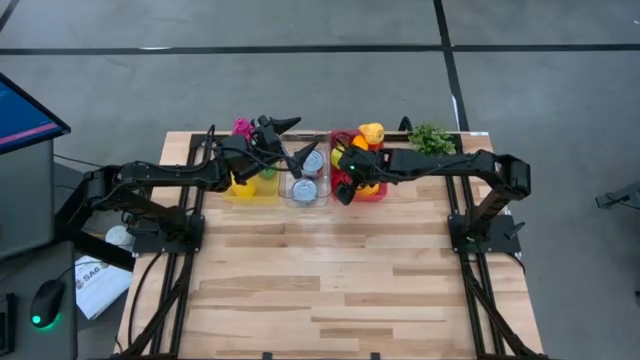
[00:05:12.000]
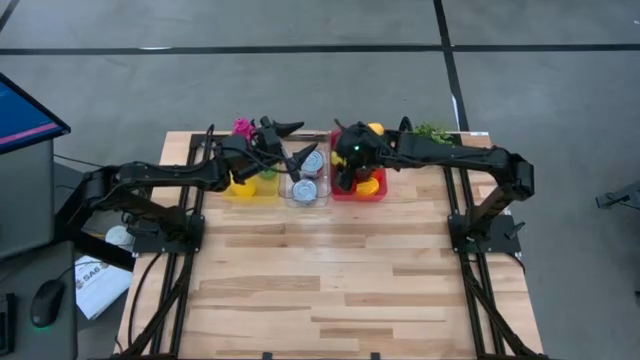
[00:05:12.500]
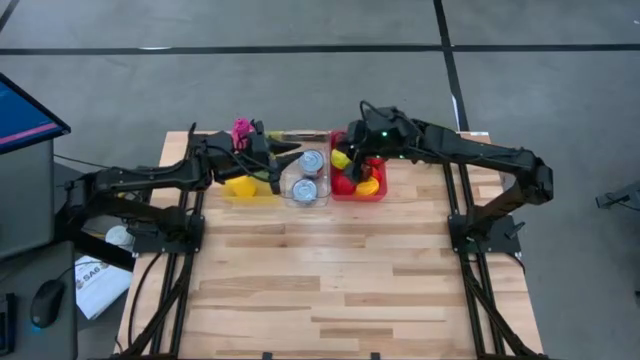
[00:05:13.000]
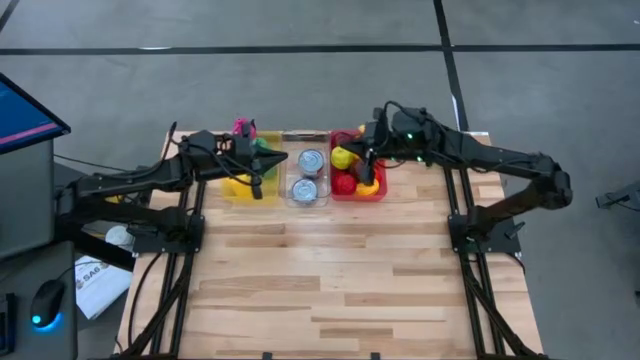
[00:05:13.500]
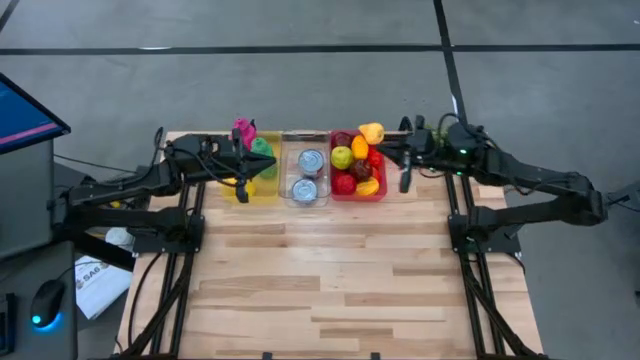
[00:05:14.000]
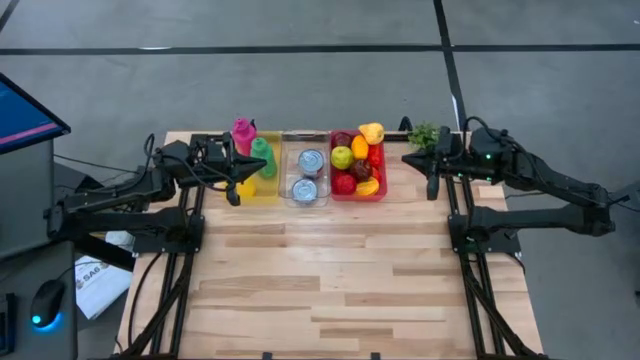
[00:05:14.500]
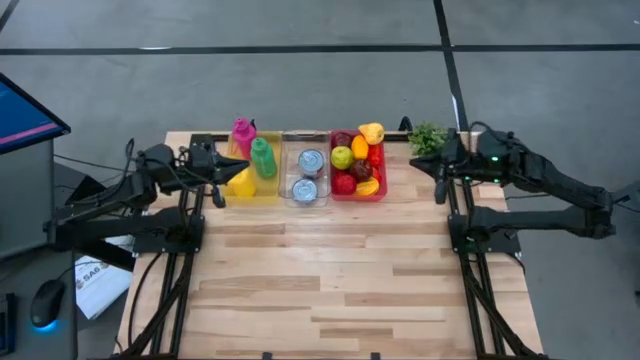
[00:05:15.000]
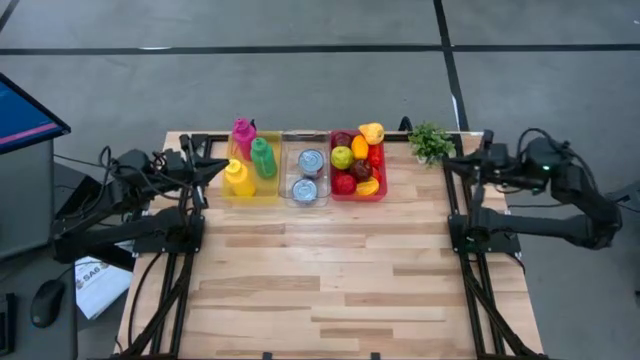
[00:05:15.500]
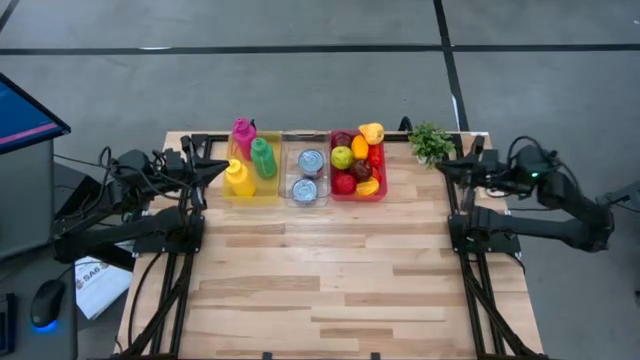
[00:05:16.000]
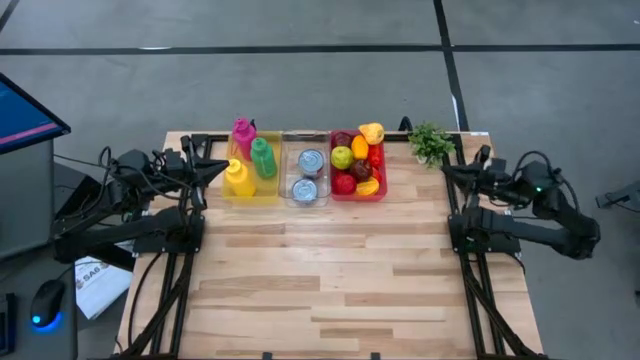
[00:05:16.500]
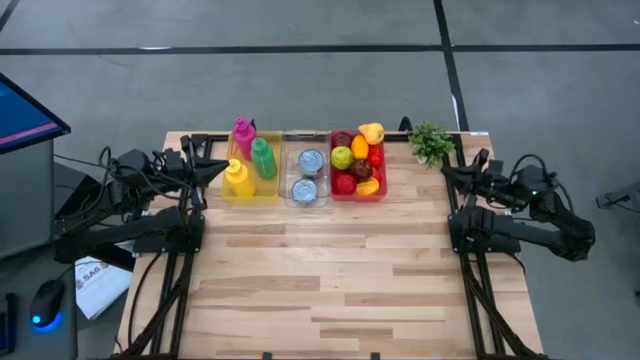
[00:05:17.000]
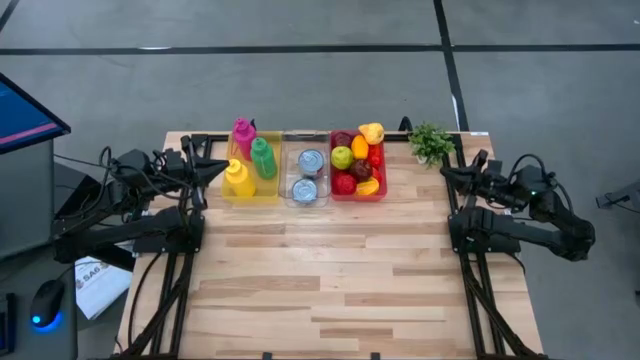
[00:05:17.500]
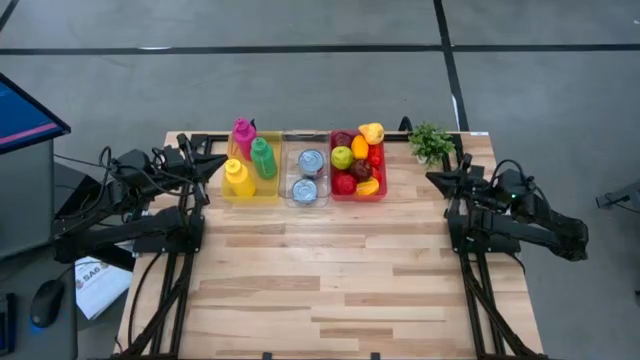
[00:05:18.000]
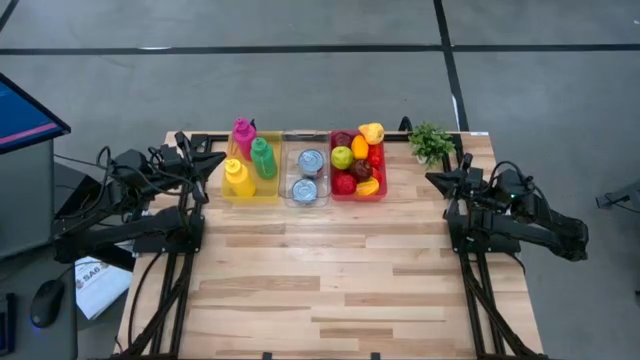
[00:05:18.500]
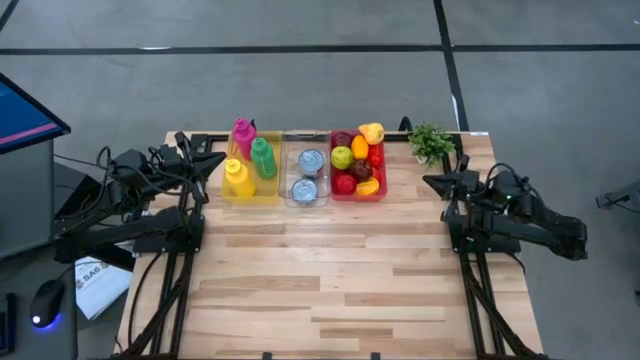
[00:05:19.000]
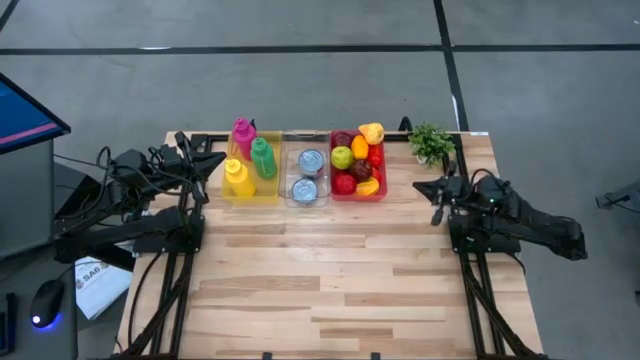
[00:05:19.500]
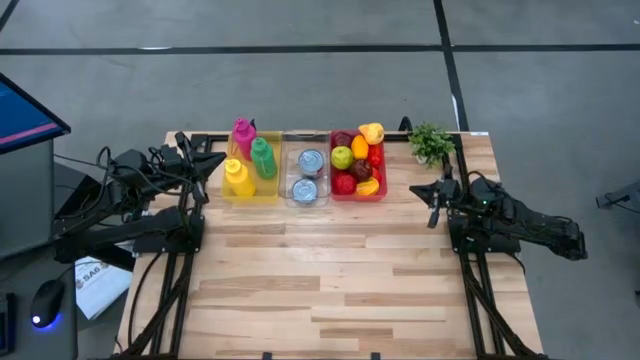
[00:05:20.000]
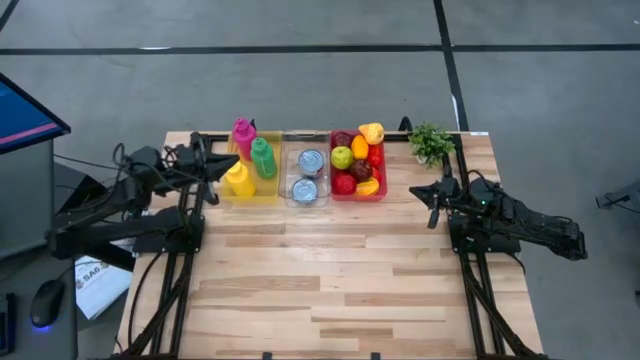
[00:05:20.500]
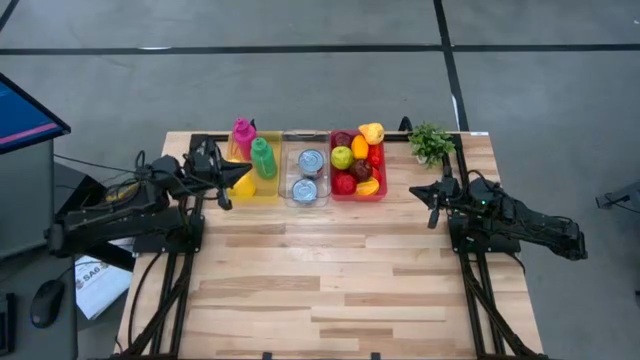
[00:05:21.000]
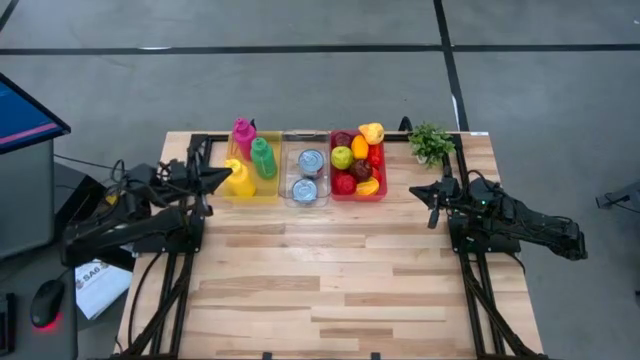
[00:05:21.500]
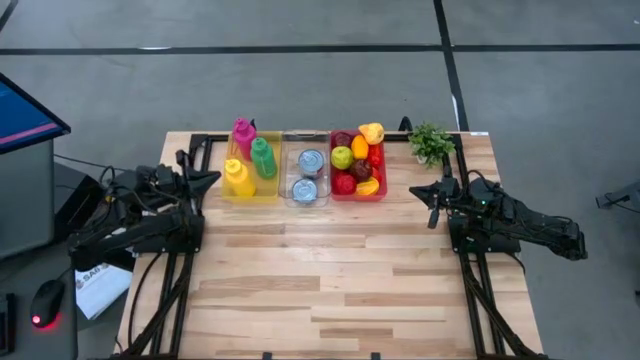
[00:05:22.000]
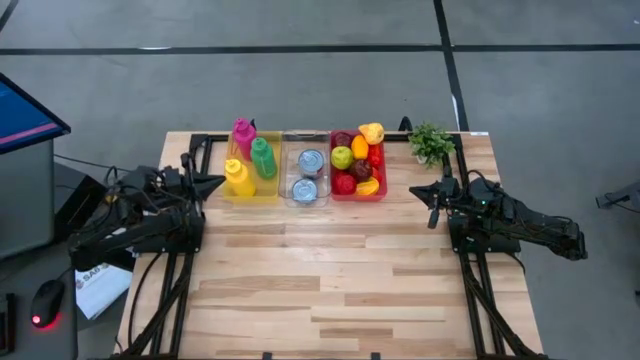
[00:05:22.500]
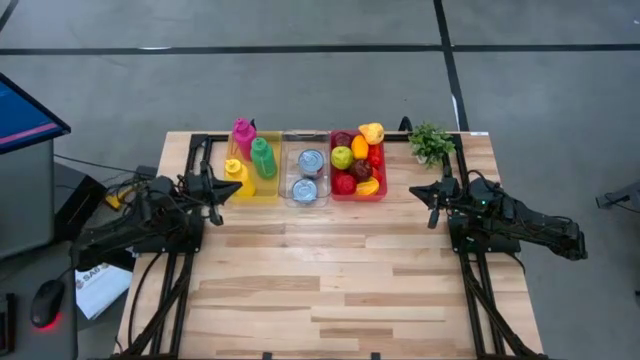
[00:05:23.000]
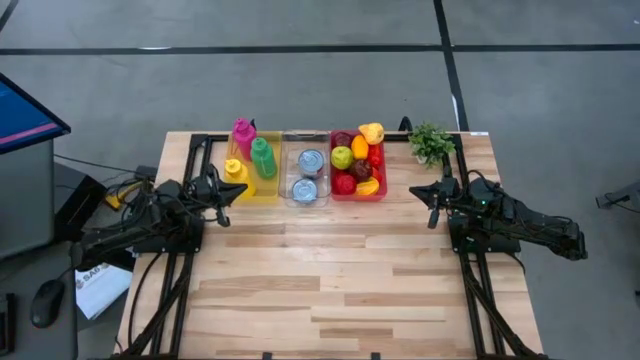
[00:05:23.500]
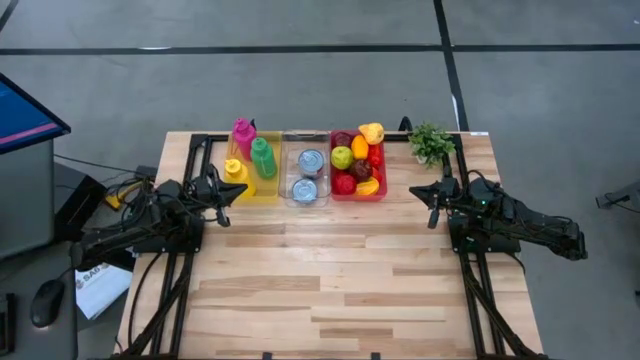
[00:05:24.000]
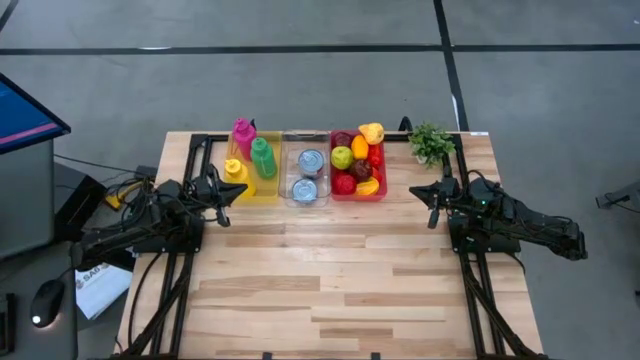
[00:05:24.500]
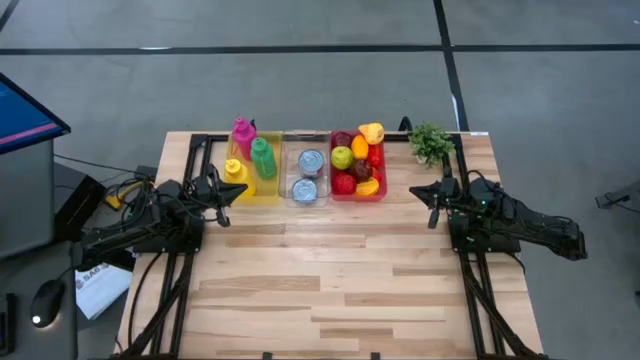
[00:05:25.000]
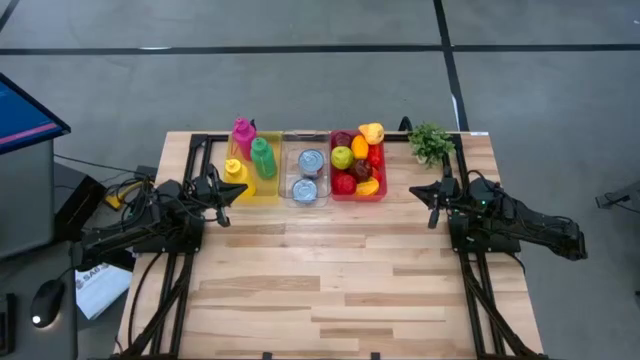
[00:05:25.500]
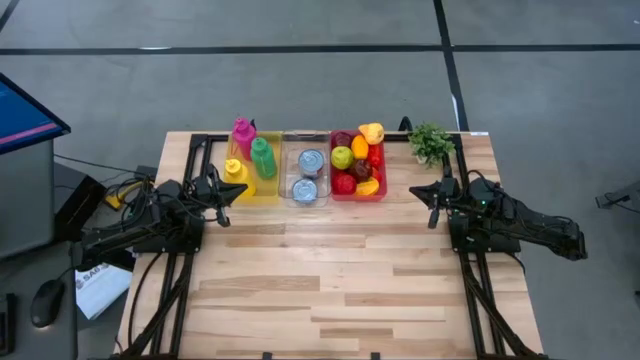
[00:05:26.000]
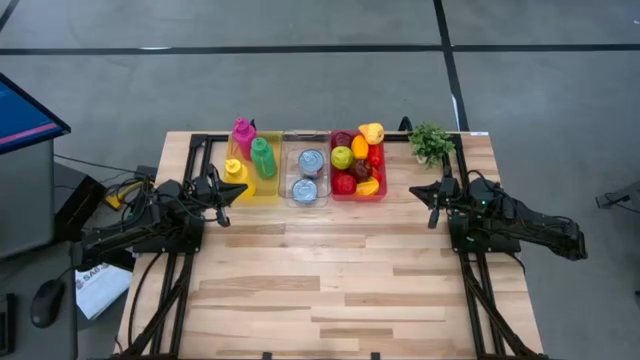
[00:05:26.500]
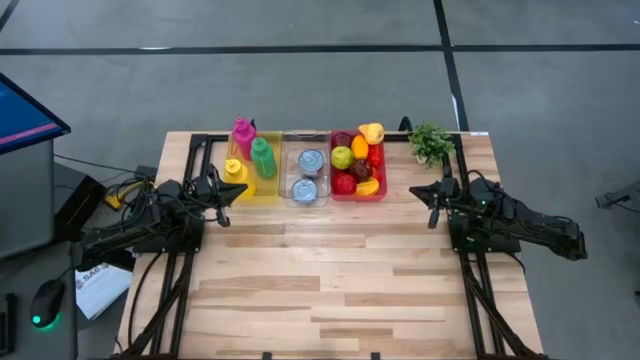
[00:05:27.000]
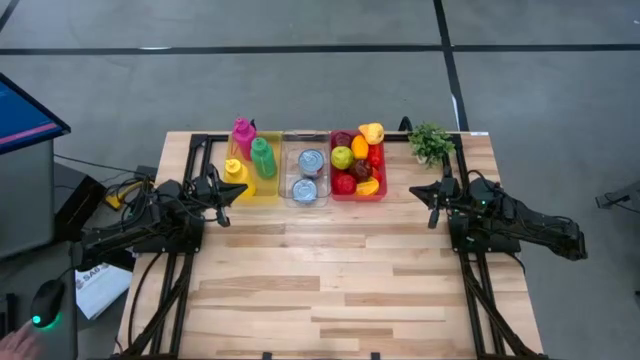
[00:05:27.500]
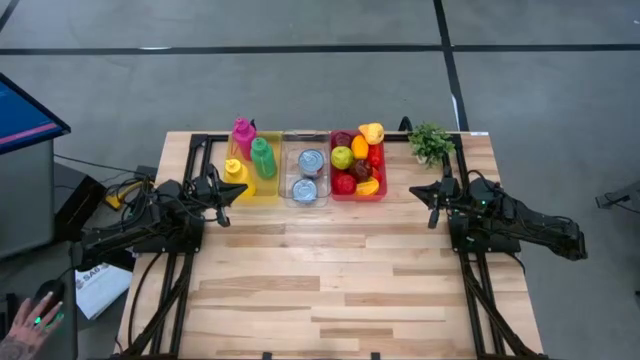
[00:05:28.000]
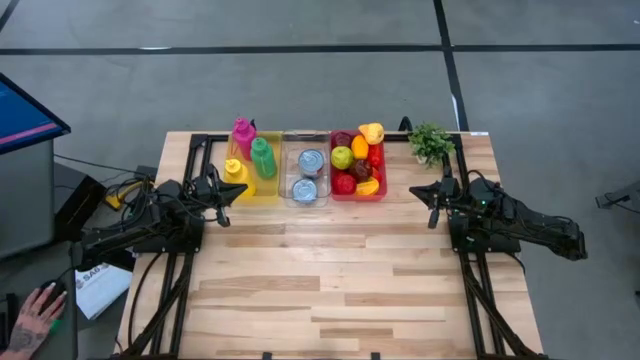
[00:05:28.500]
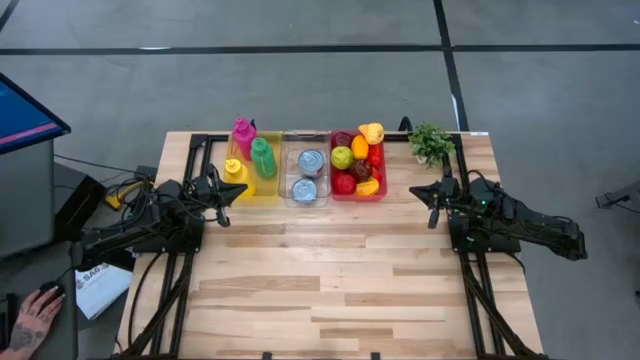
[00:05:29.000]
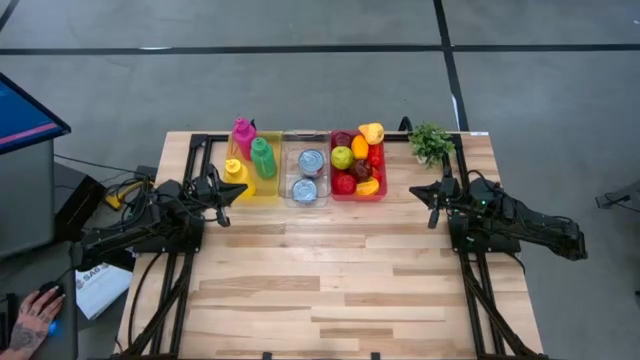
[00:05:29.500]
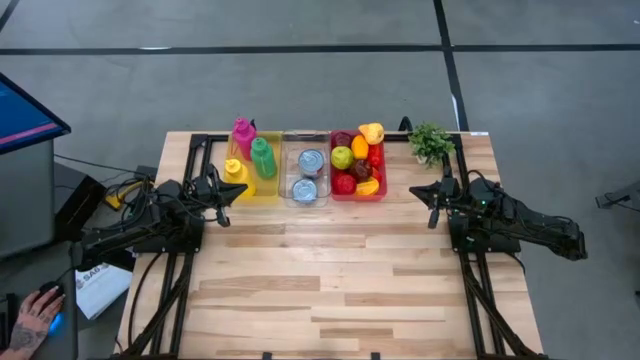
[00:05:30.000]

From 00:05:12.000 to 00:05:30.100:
Task: Pick & Place Food Item
Return to Home Position

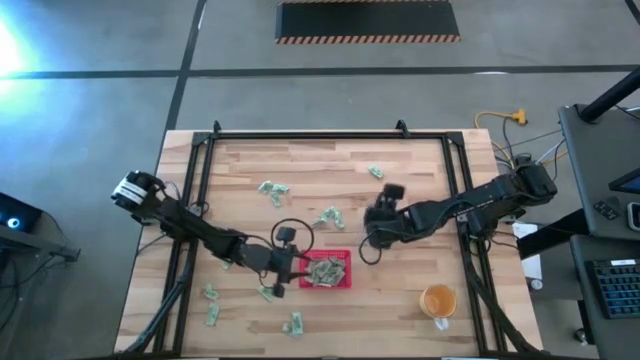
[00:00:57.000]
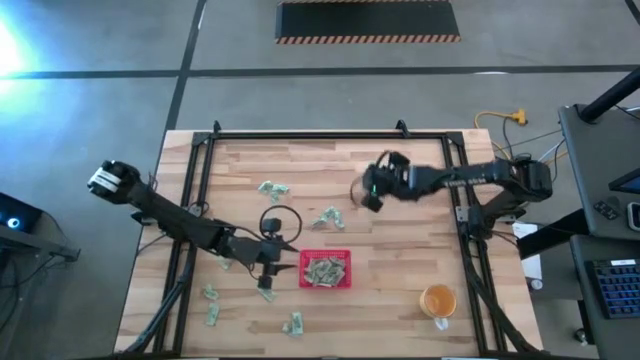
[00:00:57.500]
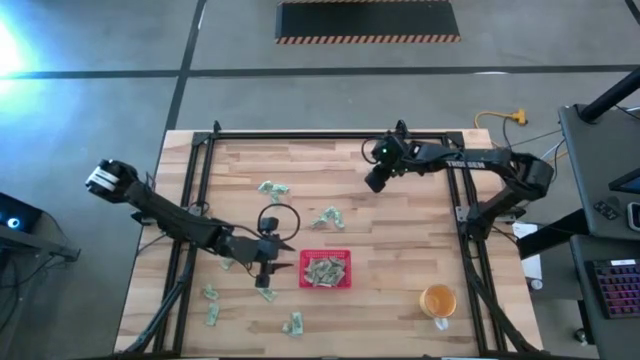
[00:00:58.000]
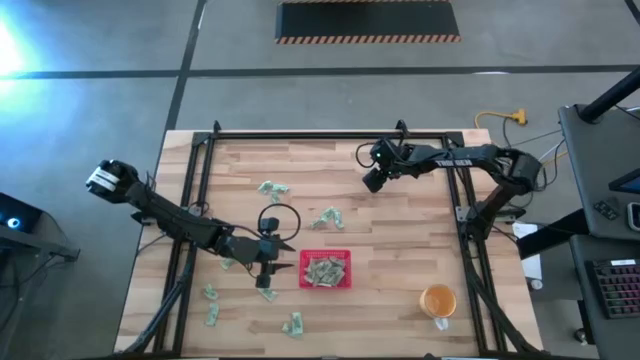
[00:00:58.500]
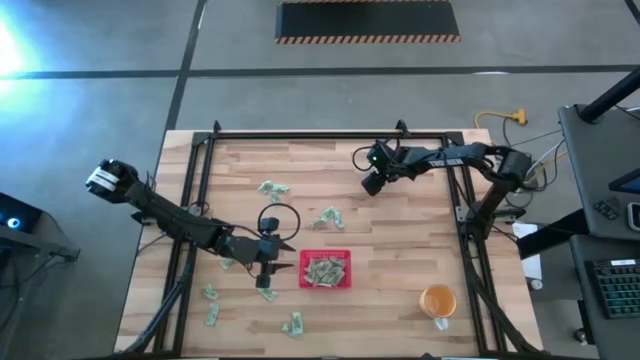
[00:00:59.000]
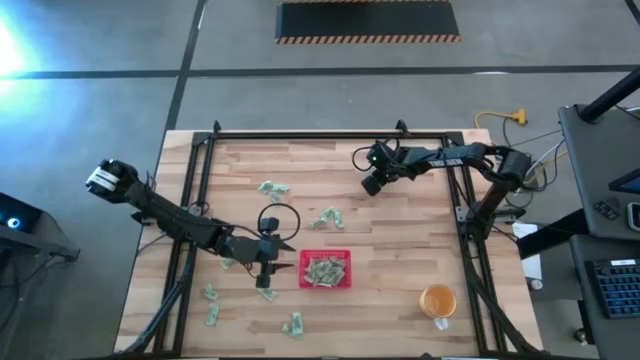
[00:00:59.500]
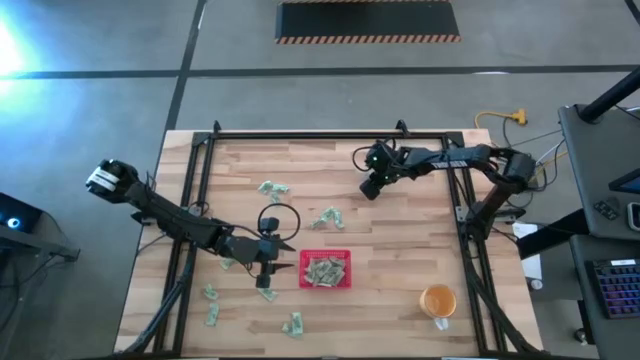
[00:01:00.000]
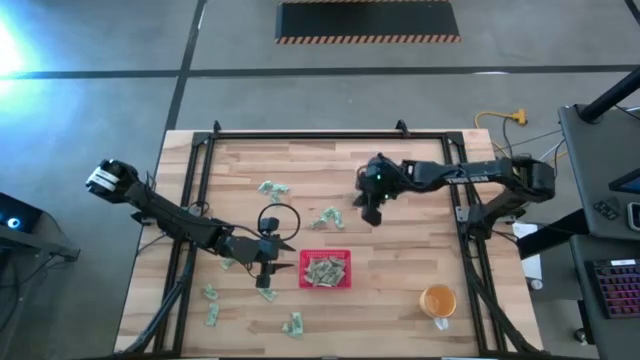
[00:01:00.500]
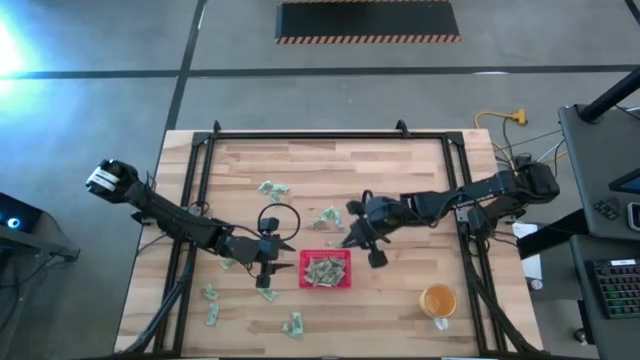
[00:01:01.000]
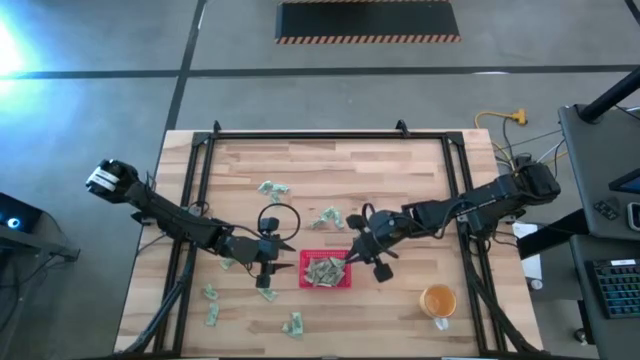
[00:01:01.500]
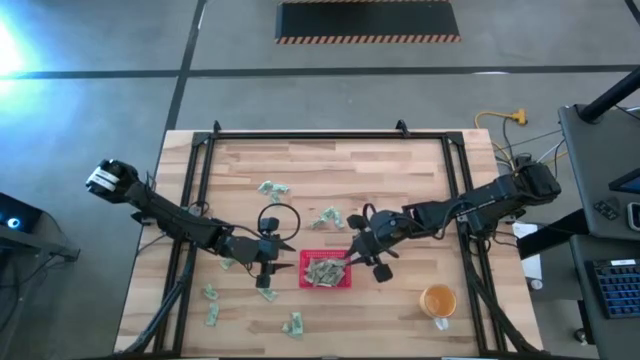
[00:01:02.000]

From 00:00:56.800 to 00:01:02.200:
Task: Pick and place Stevia / Truvia into bins
Put the white stevia packet into the red bin
